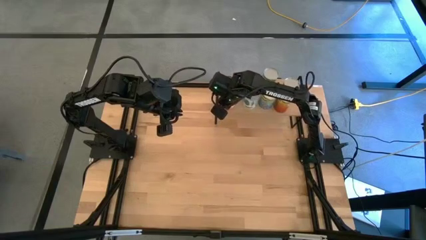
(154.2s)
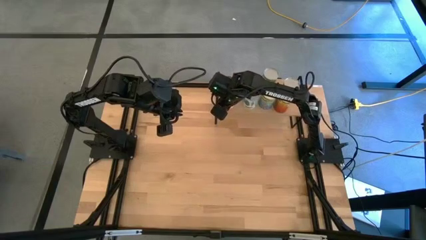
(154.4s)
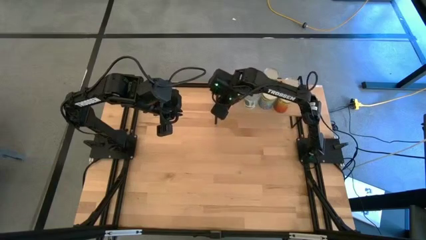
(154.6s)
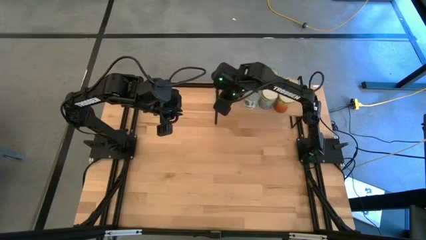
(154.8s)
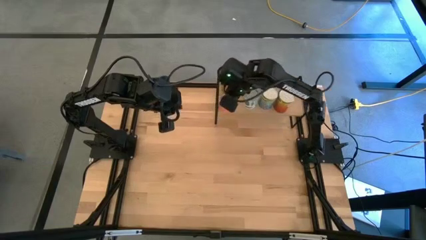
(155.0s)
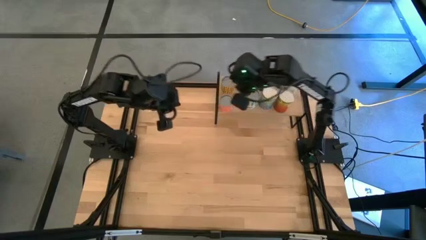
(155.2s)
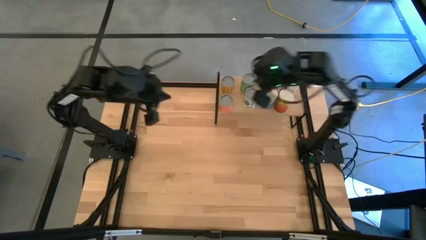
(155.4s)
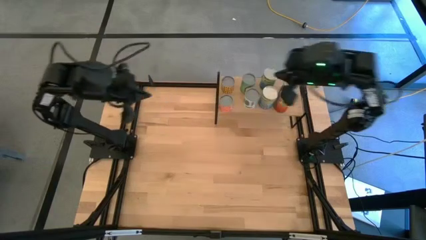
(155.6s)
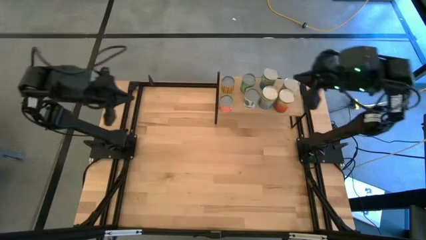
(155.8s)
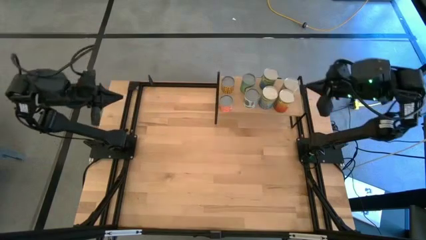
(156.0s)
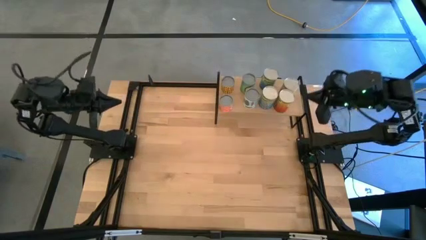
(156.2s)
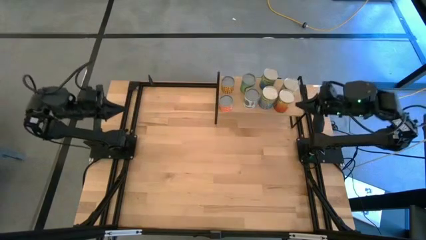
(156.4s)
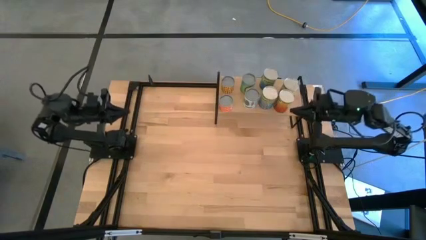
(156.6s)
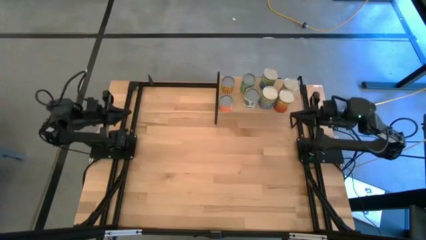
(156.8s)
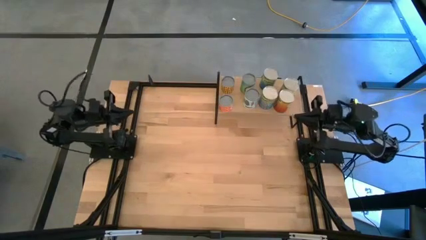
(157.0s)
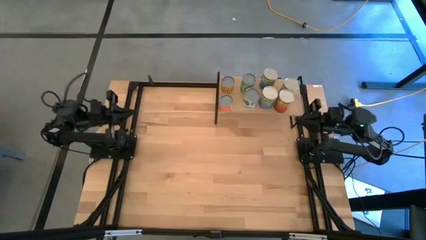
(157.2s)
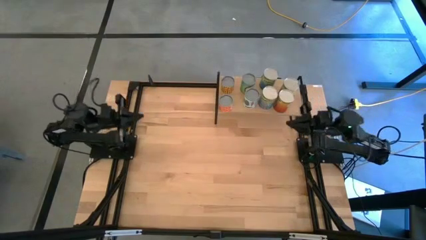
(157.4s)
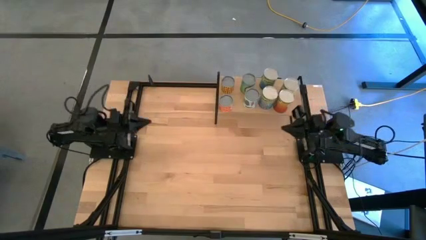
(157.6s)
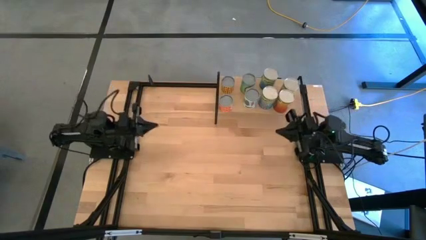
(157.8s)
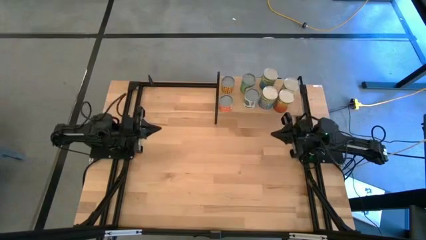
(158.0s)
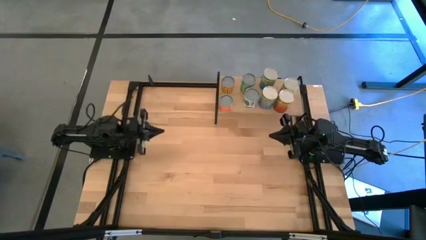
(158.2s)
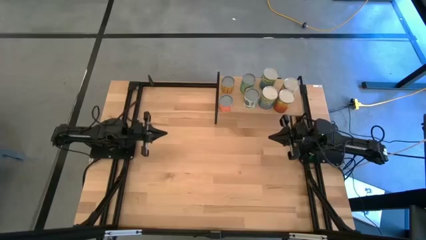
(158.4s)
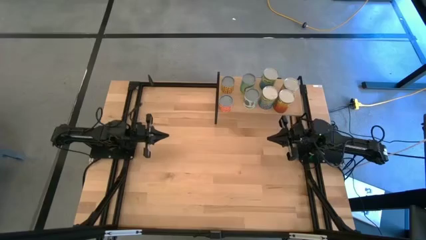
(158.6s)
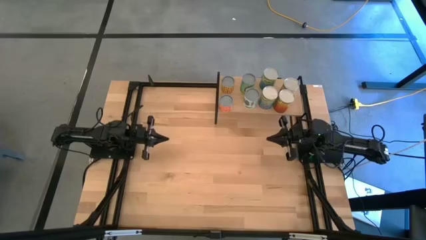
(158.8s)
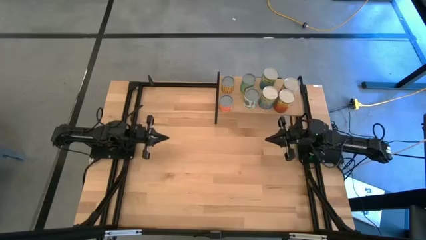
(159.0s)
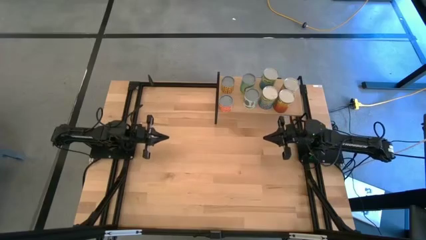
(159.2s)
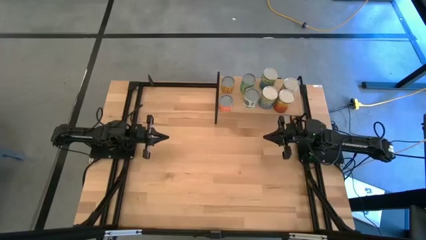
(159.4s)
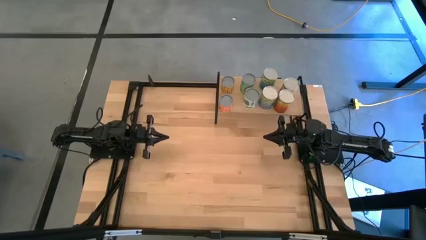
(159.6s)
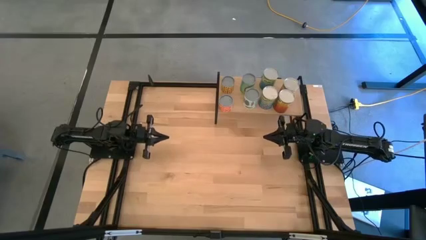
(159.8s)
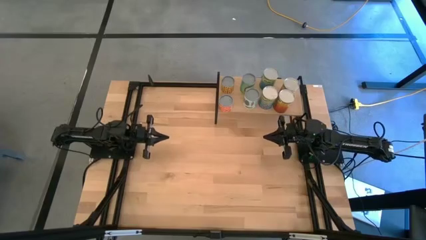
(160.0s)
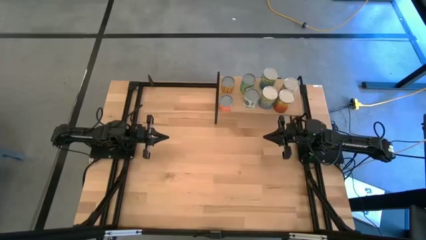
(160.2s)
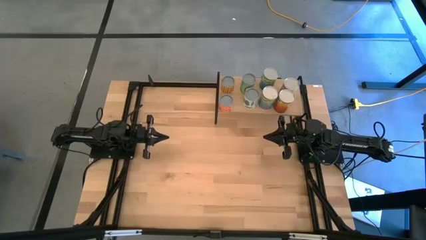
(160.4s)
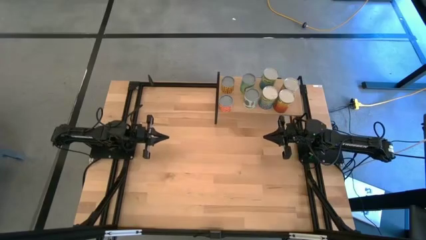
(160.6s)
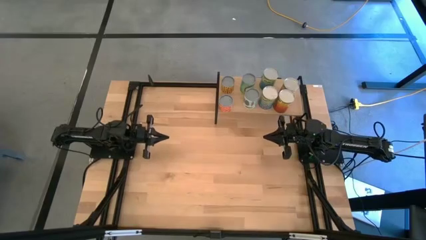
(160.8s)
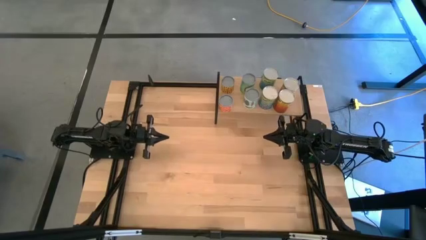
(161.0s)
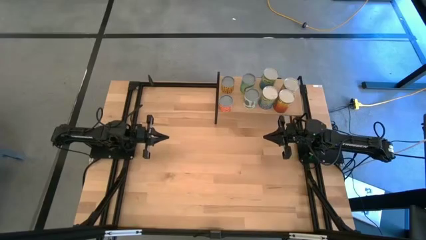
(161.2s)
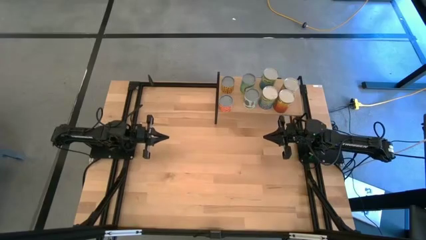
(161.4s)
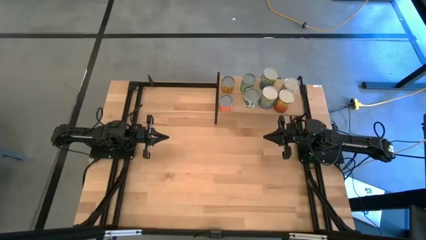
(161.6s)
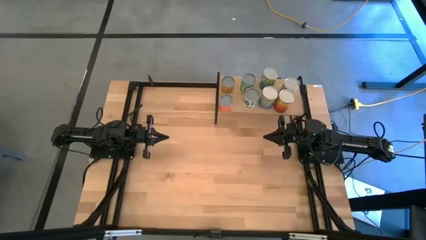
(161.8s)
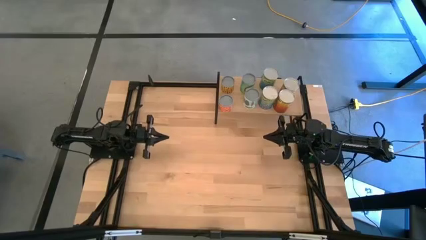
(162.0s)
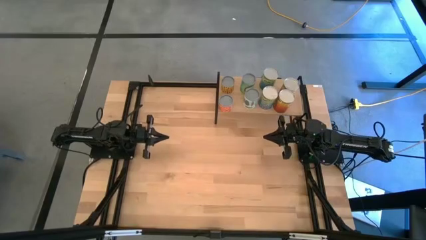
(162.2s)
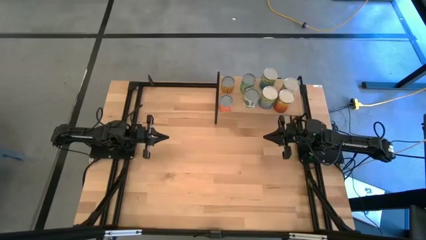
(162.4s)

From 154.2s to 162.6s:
Task: Pick and place cans onto a shelf
Return to Home Position

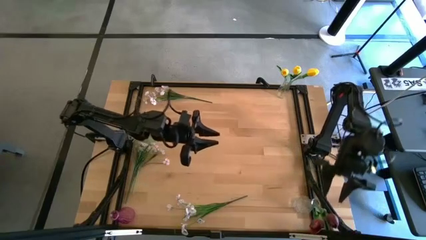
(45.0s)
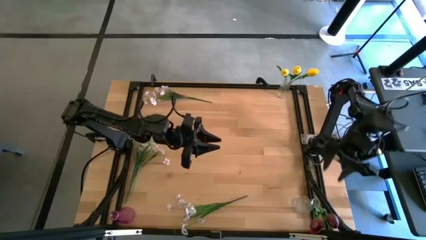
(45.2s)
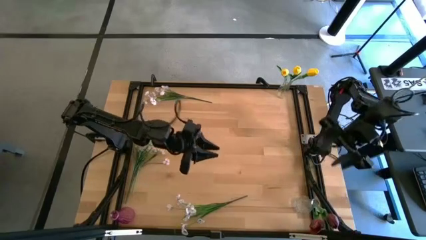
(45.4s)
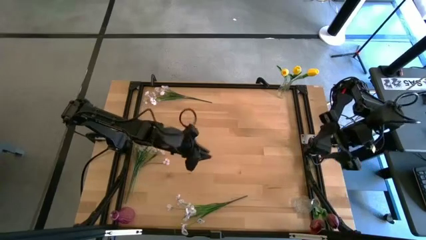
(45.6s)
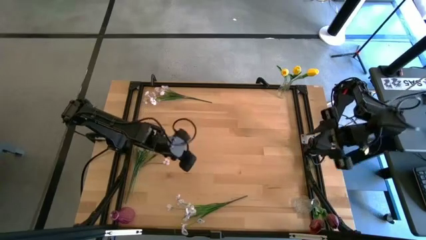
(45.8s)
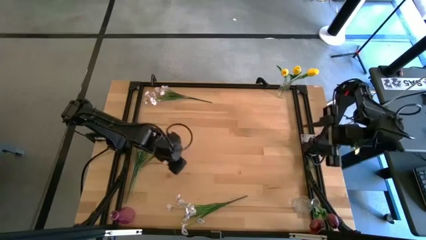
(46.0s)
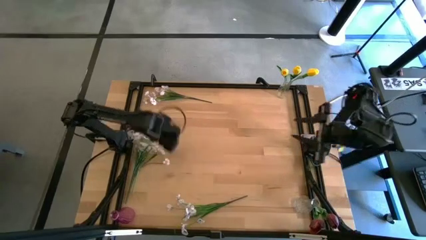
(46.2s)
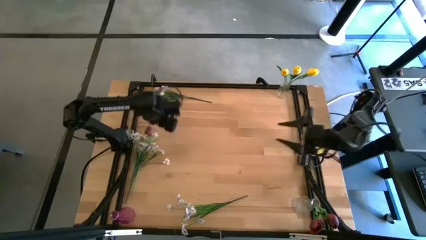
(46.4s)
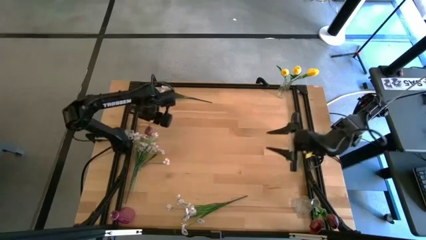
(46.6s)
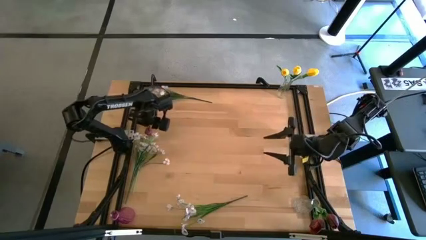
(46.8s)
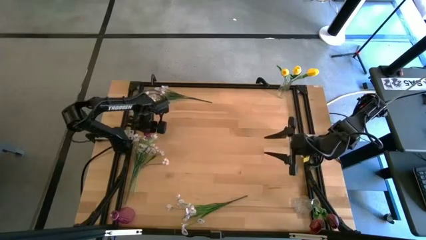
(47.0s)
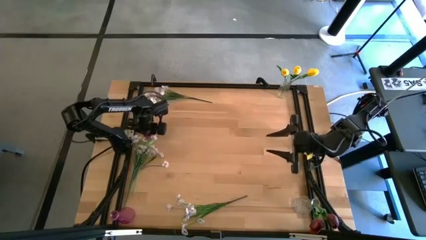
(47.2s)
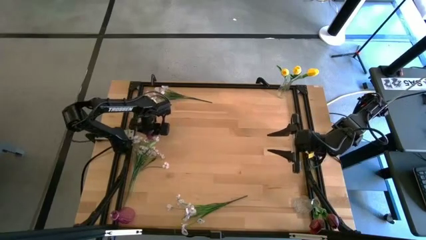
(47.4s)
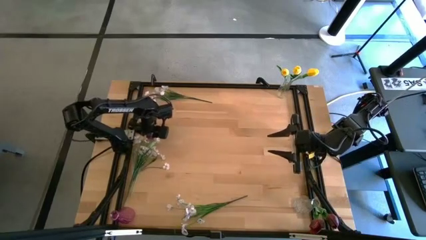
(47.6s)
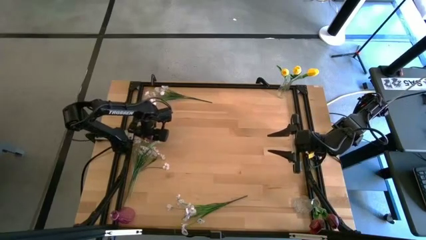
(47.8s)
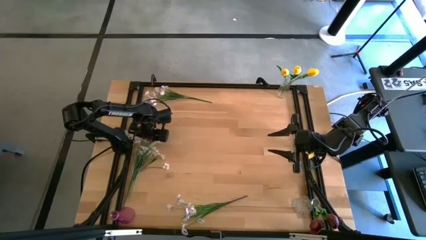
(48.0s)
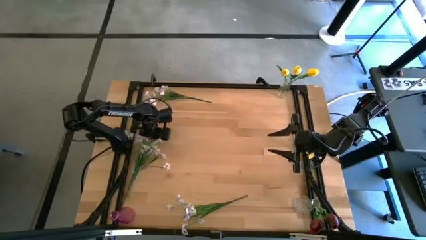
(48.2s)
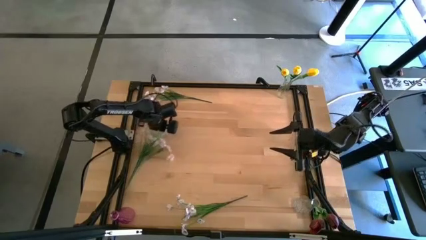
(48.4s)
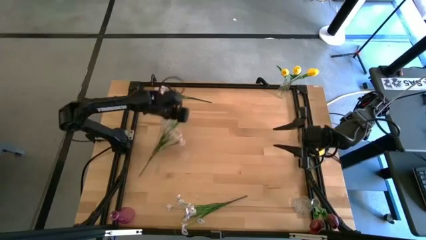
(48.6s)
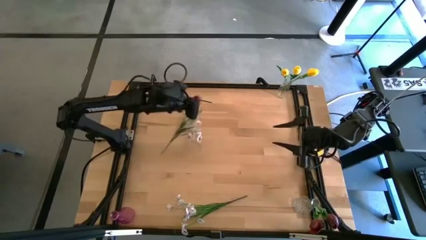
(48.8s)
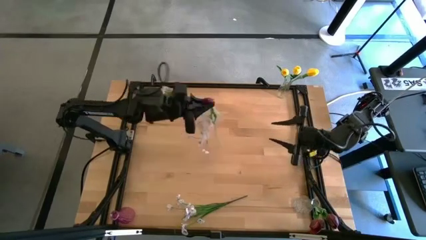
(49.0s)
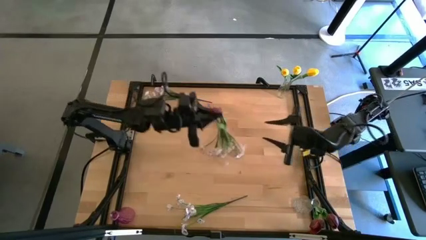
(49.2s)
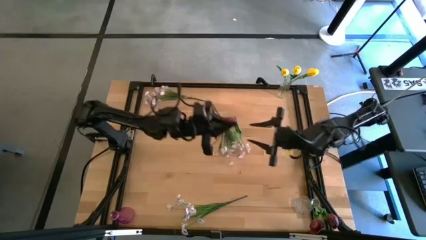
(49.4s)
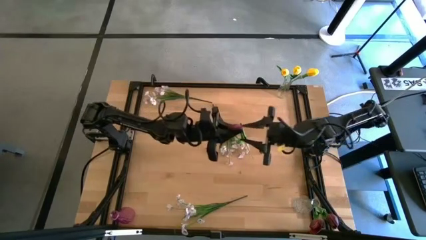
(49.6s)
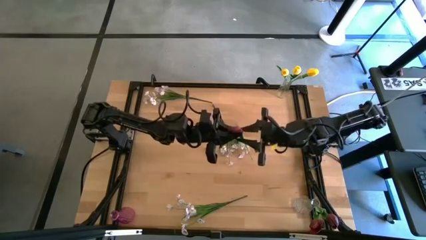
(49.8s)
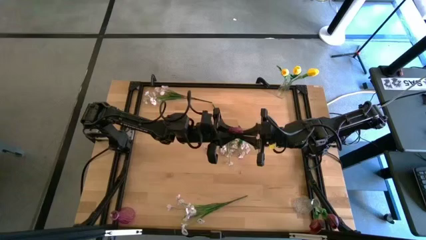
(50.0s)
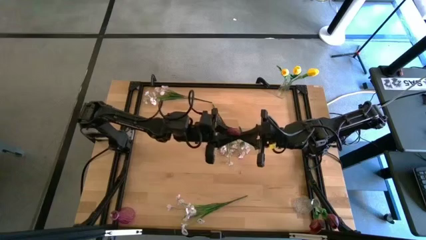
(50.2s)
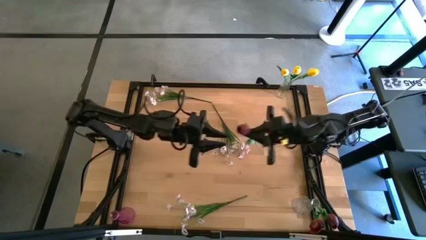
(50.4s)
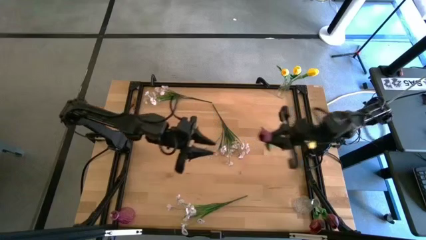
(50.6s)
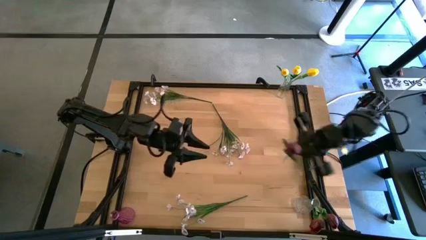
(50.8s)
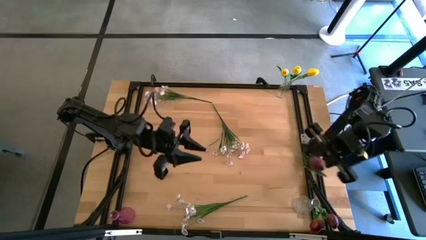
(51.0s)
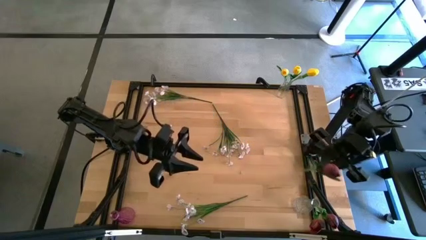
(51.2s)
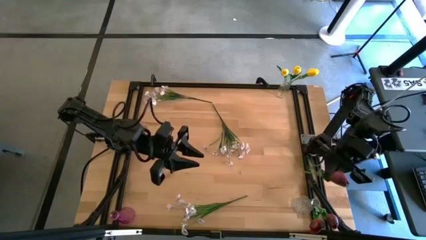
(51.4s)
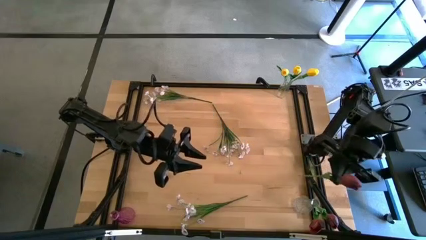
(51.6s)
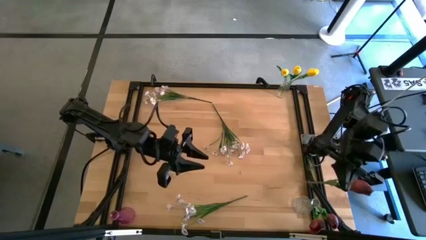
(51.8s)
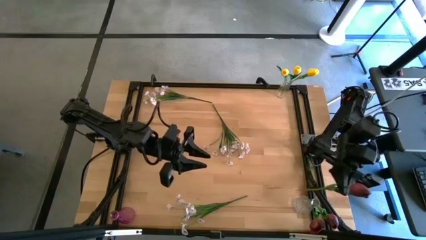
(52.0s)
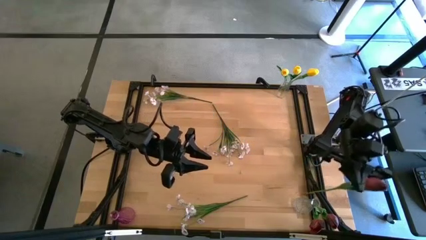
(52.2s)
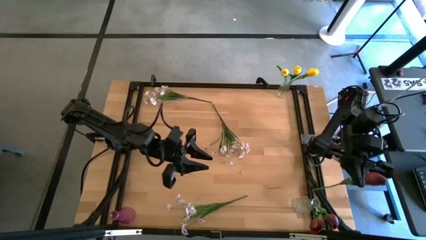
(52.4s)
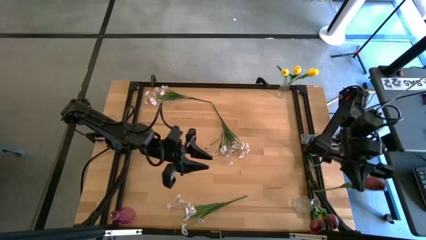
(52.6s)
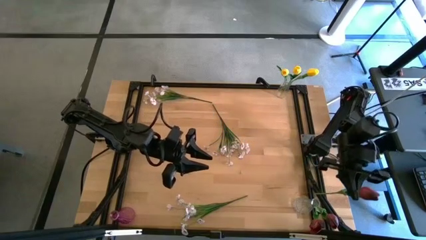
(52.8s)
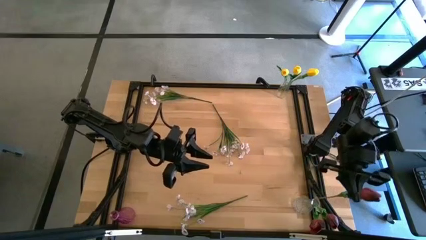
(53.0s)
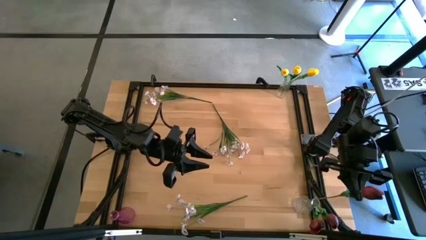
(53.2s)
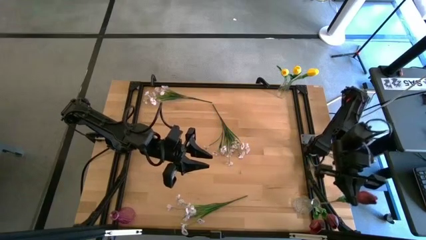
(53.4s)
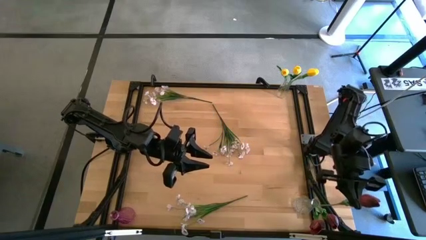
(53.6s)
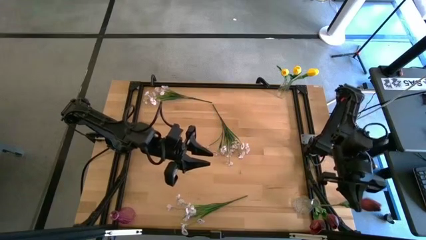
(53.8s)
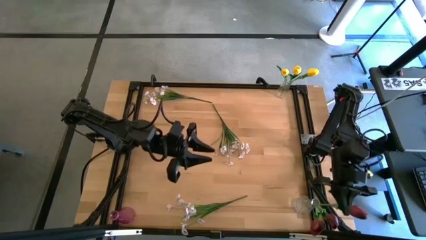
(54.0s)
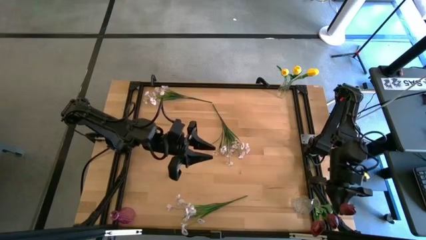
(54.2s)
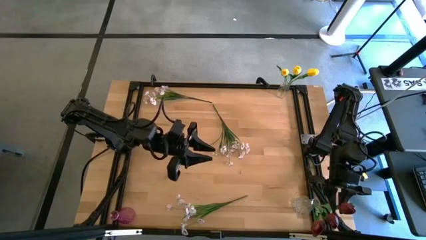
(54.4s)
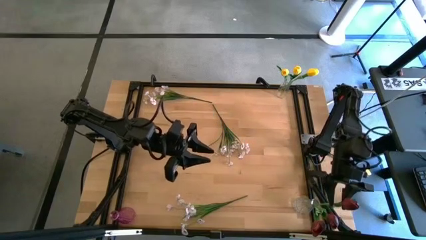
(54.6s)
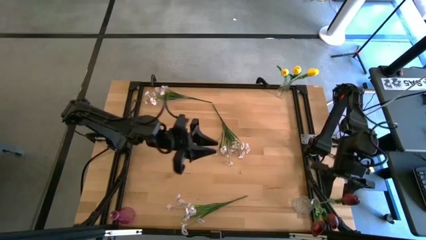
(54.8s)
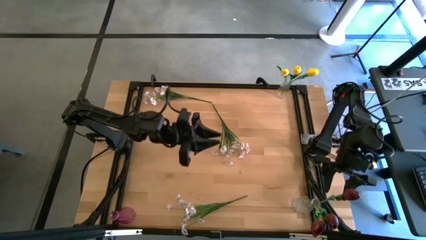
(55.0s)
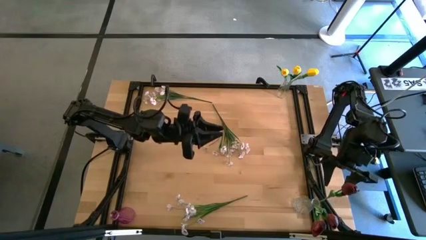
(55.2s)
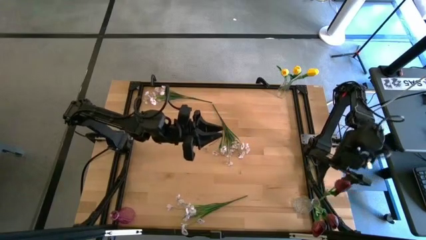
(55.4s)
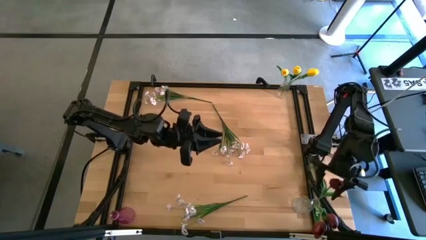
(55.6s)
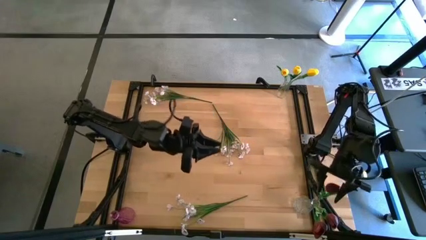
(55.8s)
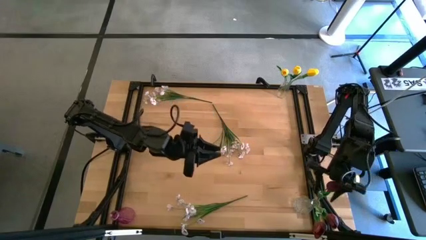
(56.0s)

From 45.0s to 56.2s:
Task: Sort flowers into vase by color
Put the red tulip into the white crystal vase
